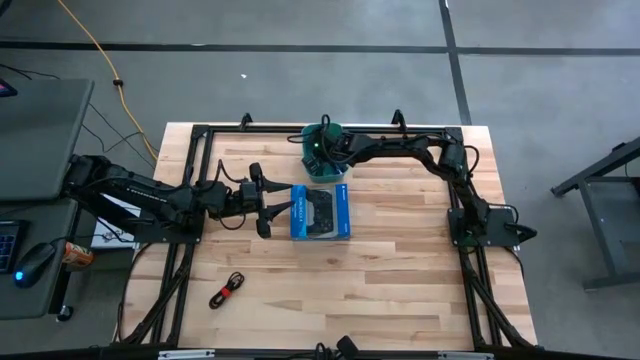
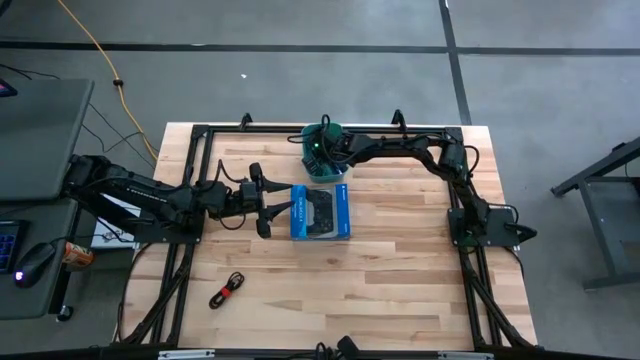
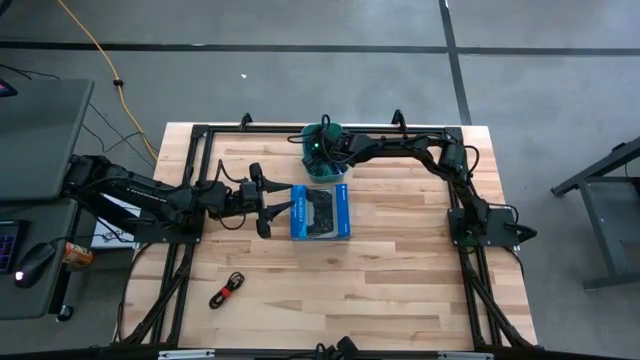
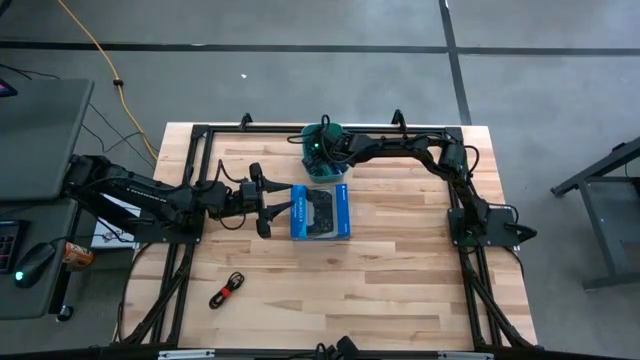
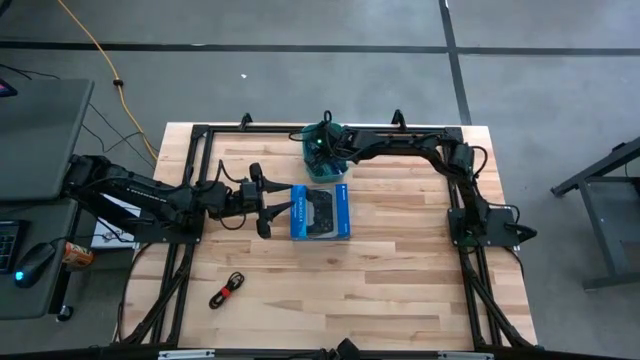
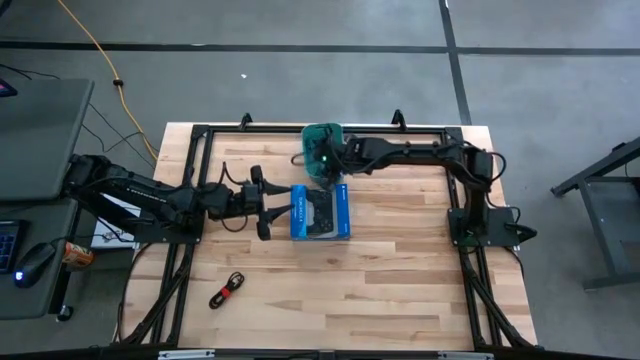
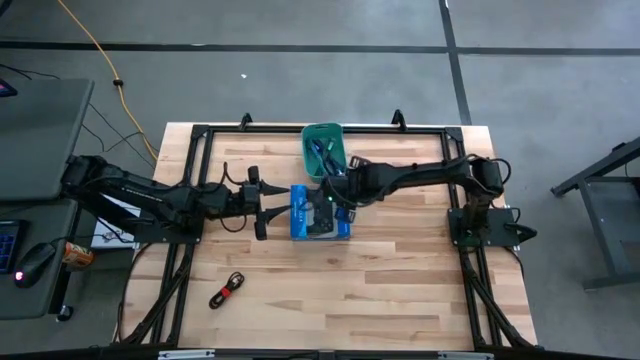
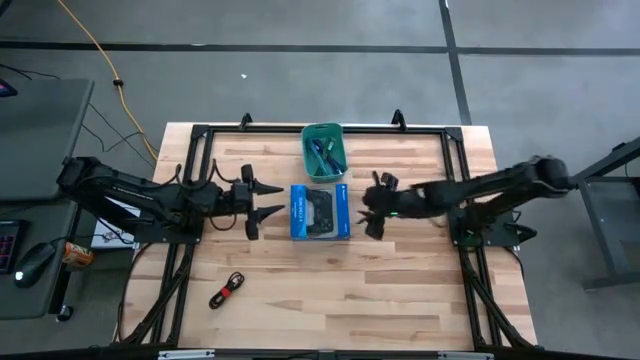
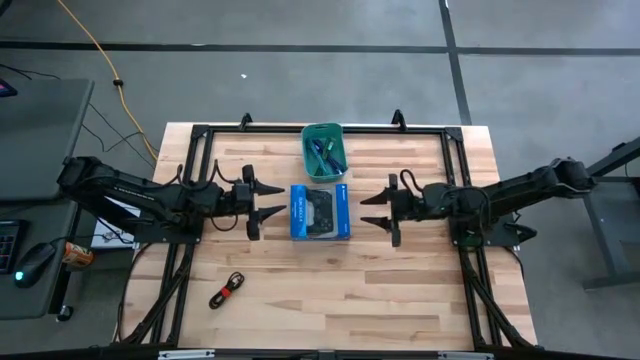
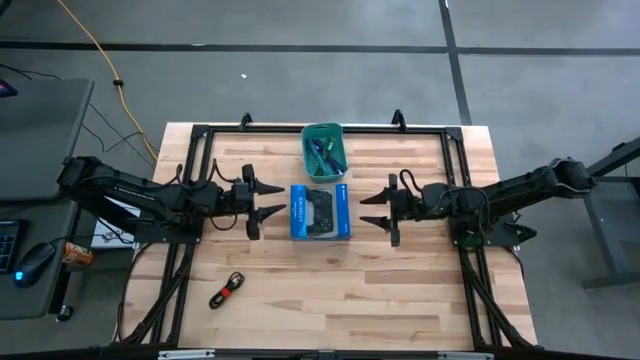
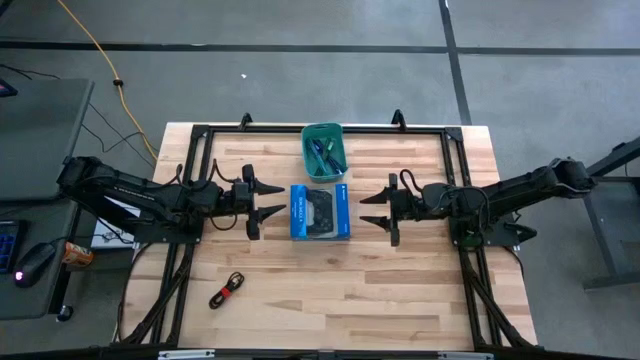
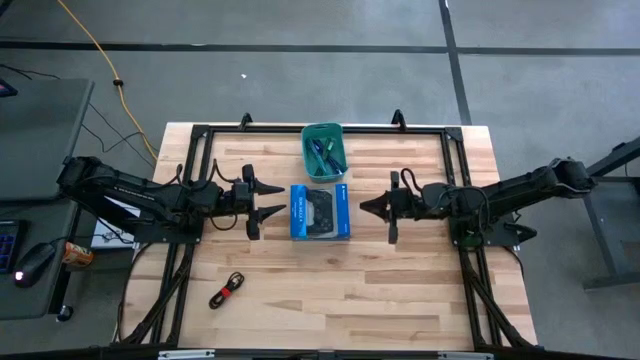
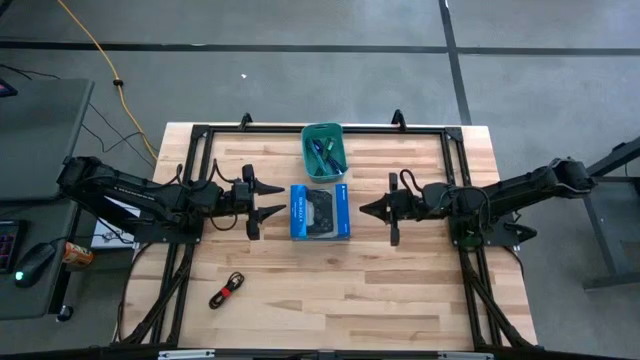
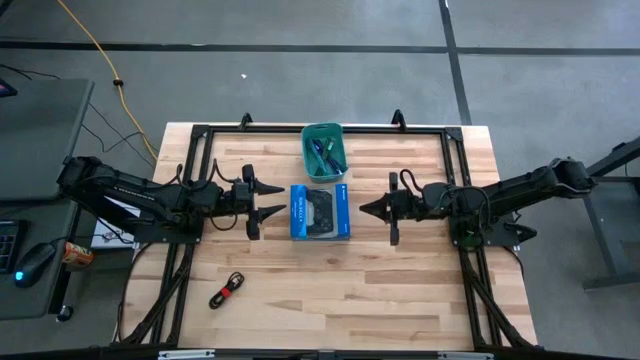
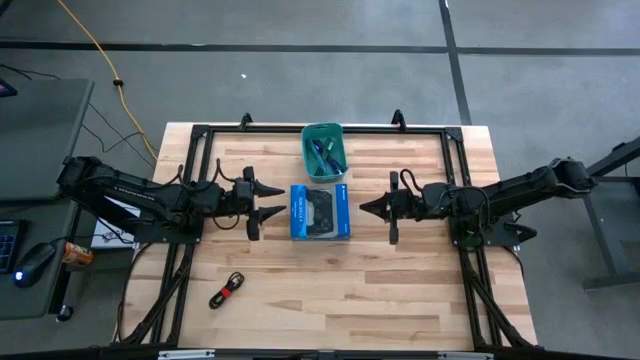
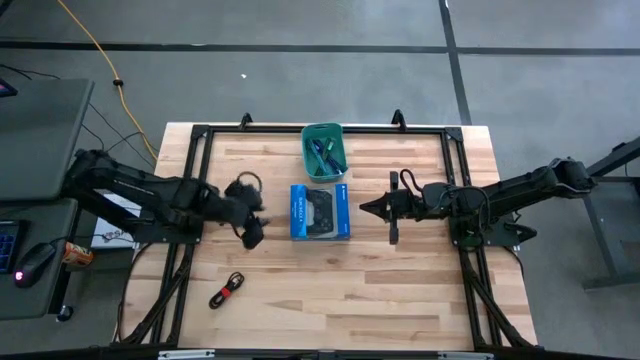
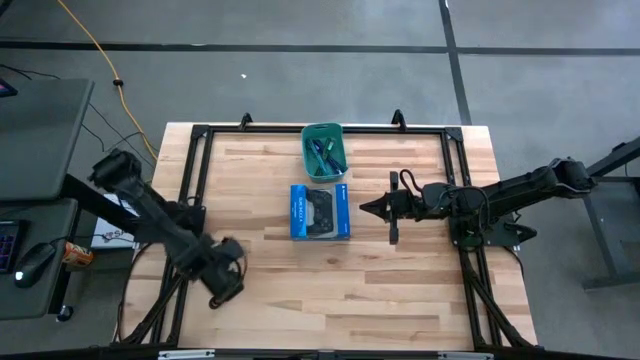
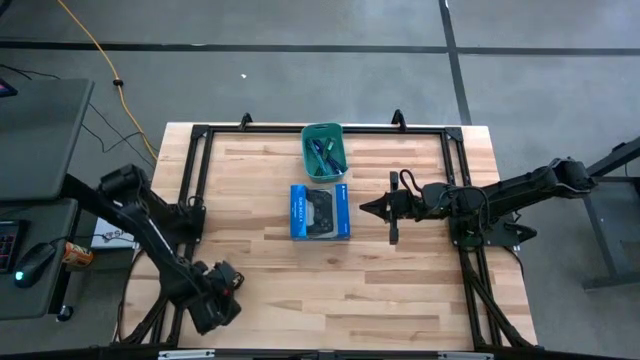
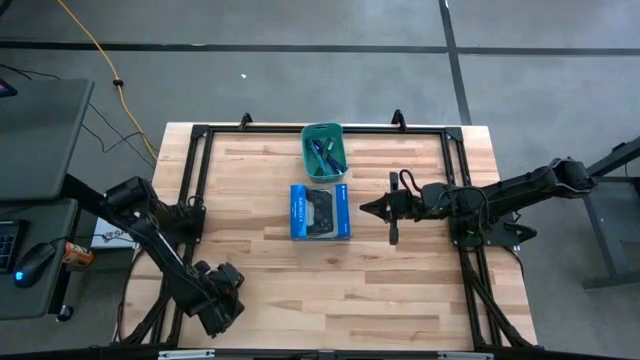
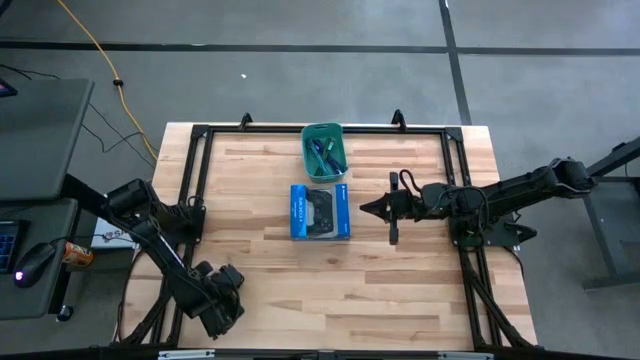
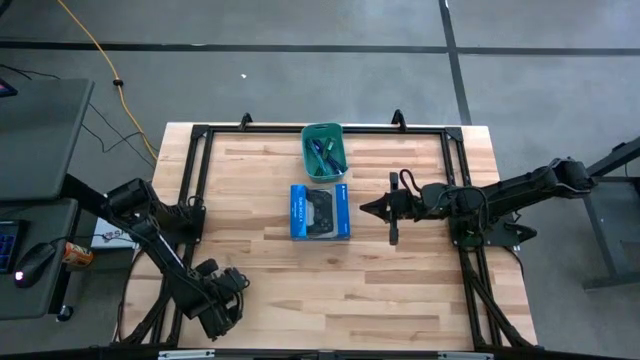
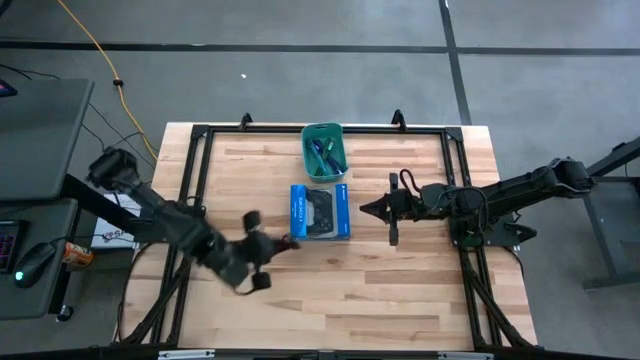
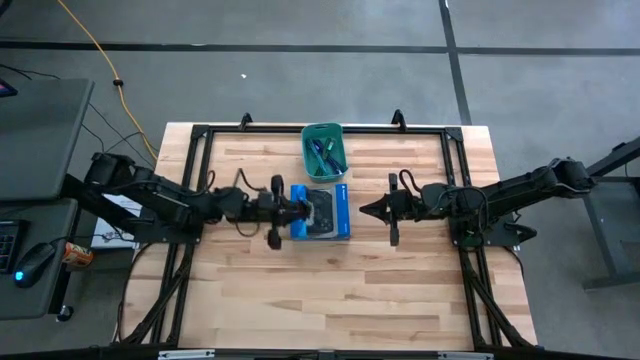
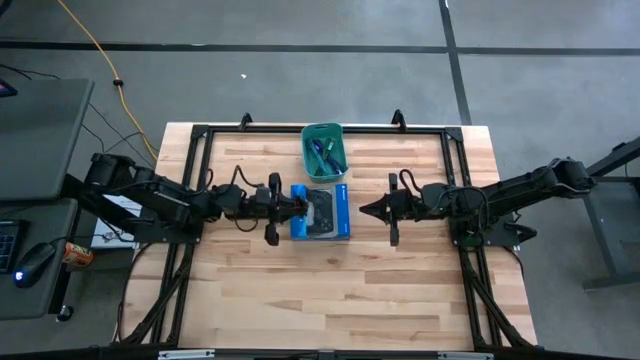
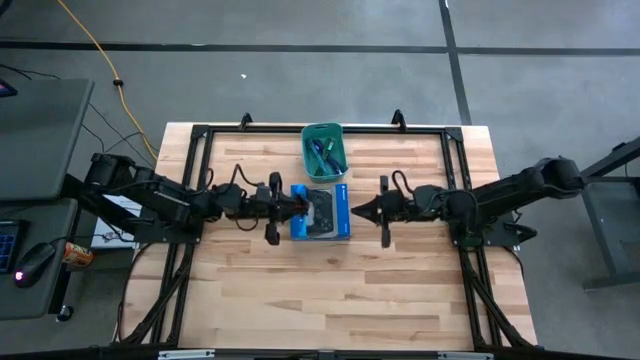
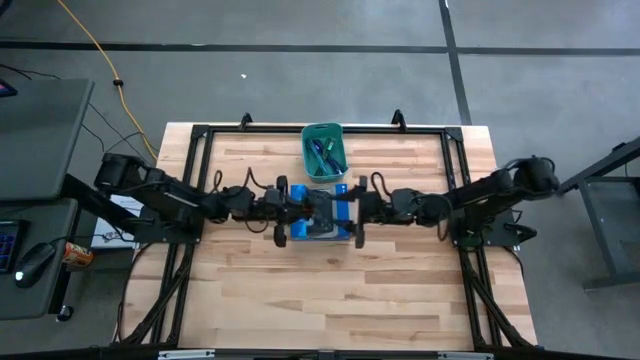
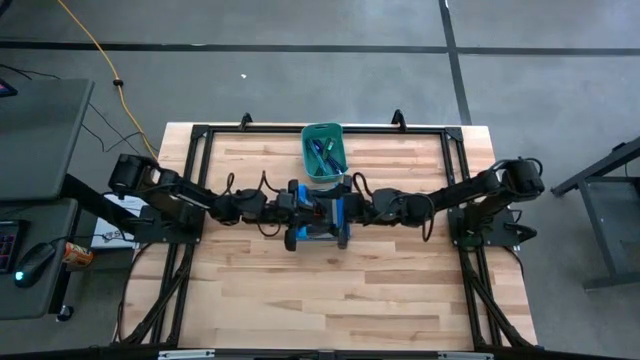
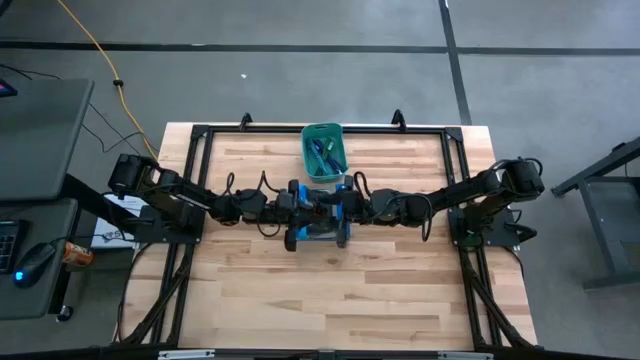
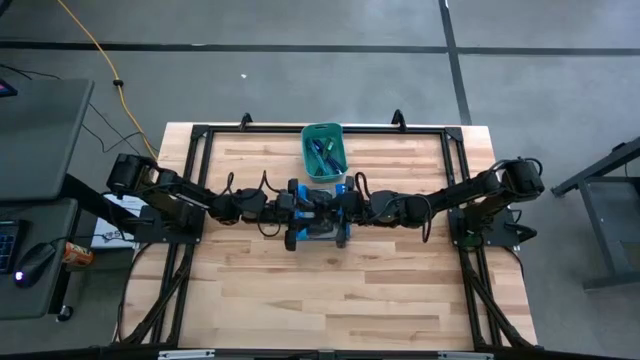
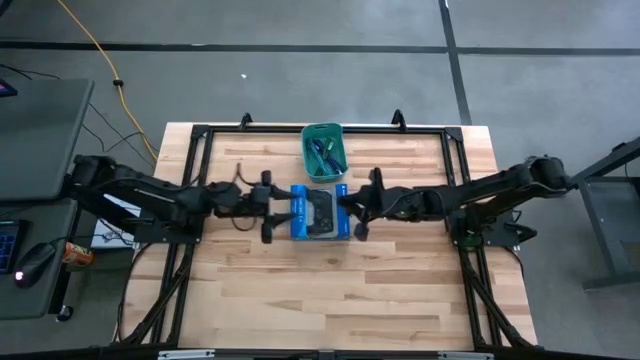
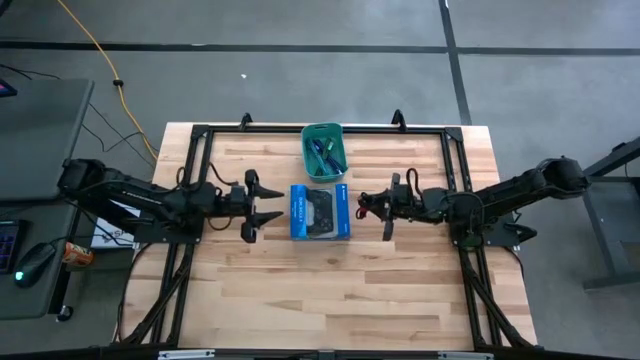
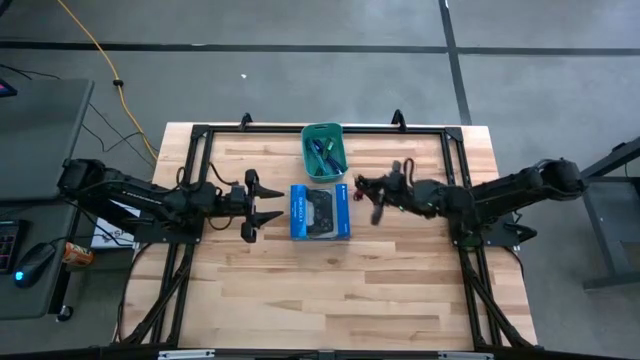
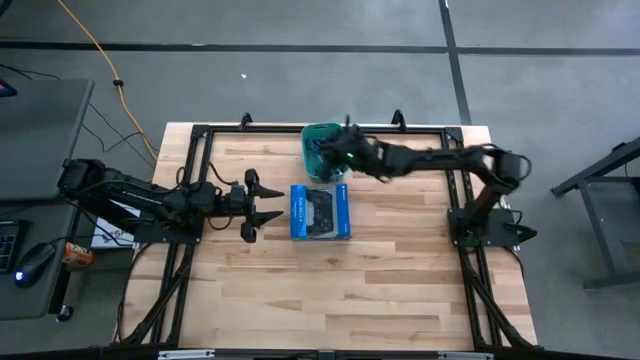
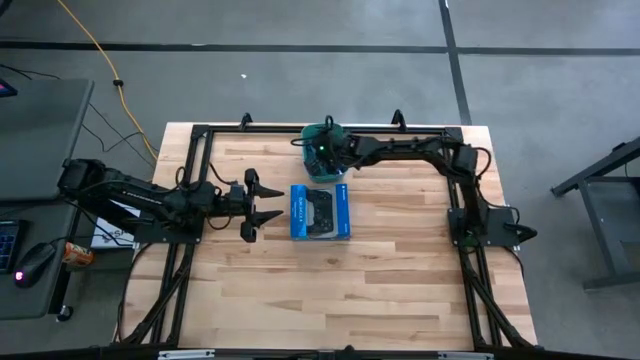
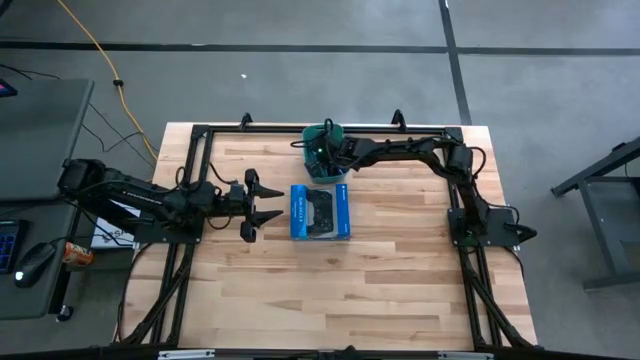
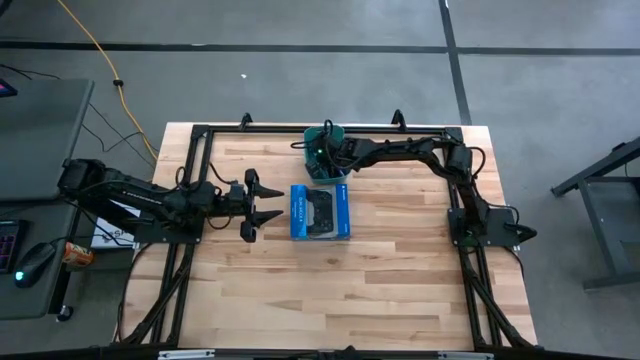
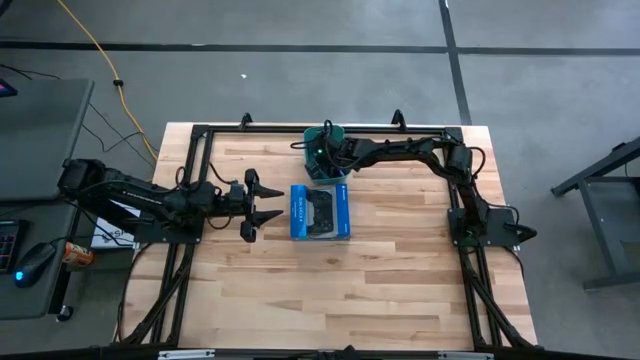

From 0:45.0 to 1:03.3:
Task: Pick and place USB-C Cables
Put the black charger cable into the light blue bin

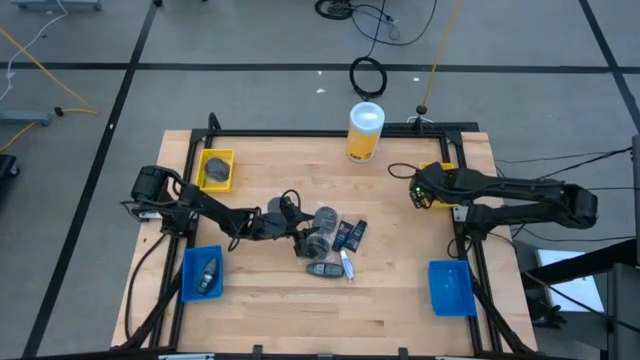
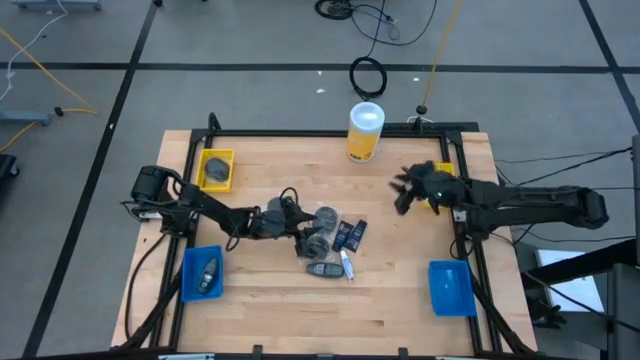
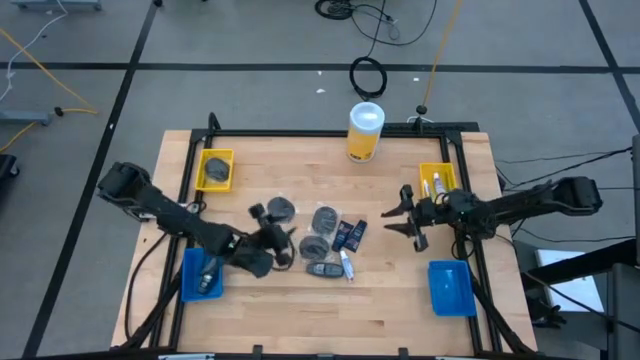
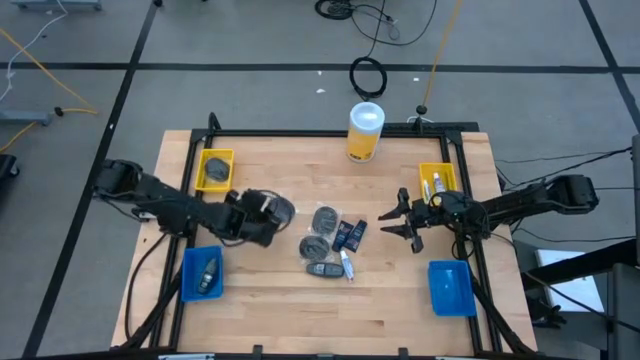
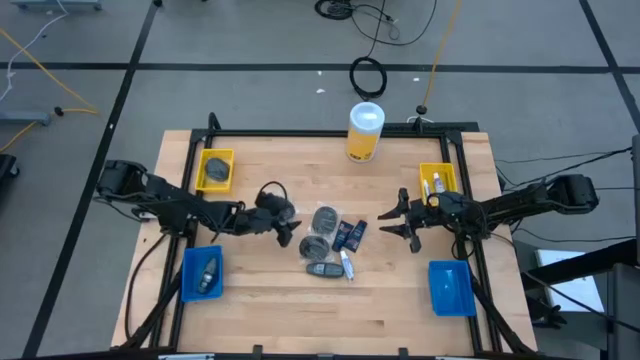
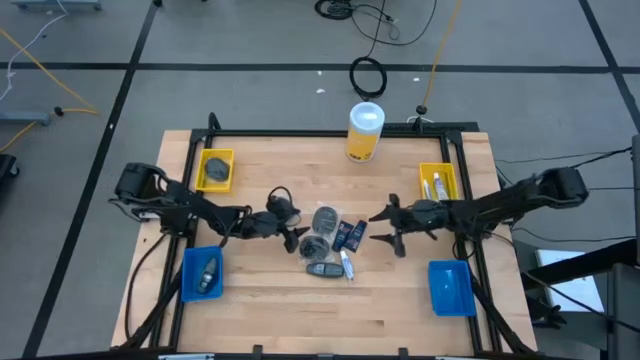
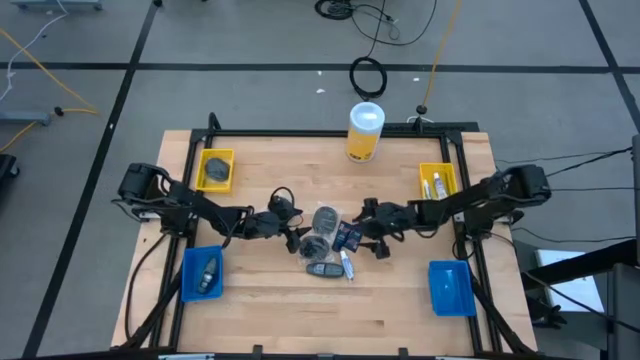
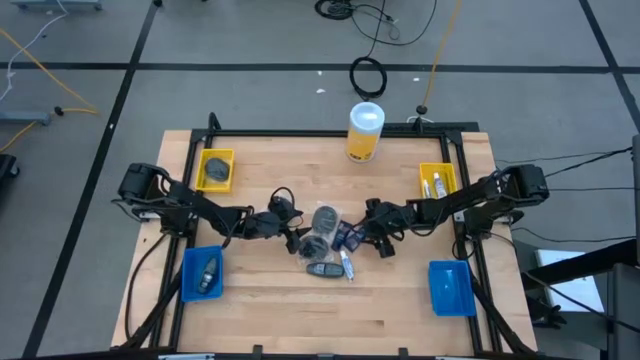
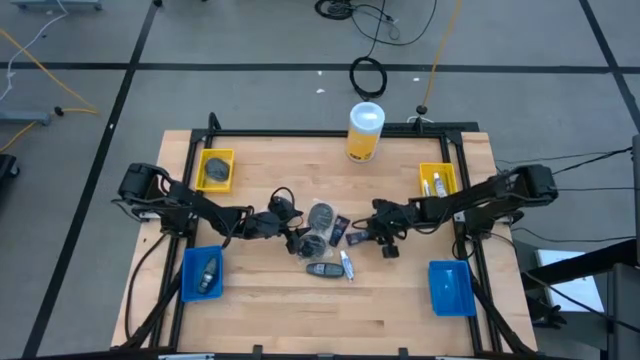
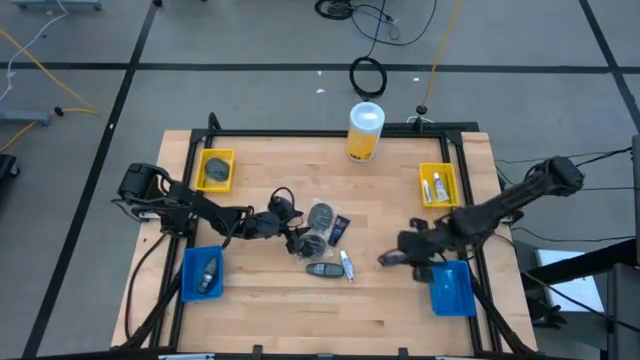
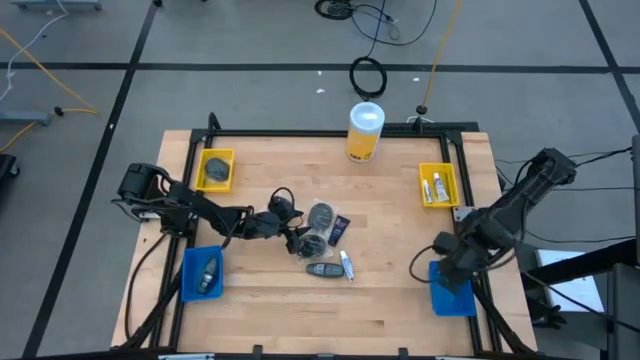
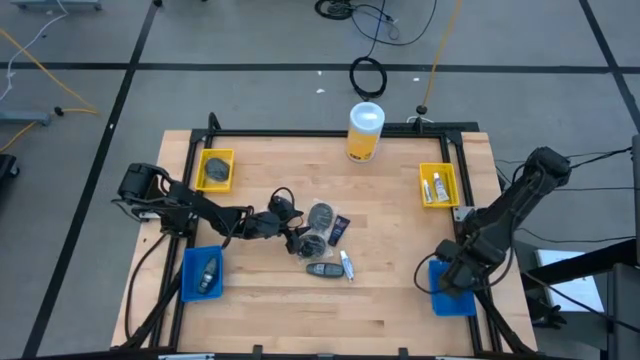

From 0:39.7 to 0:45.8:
Task: Pick & Place Travel size toiletries
Put the blue shaving cream into the right blue bin
